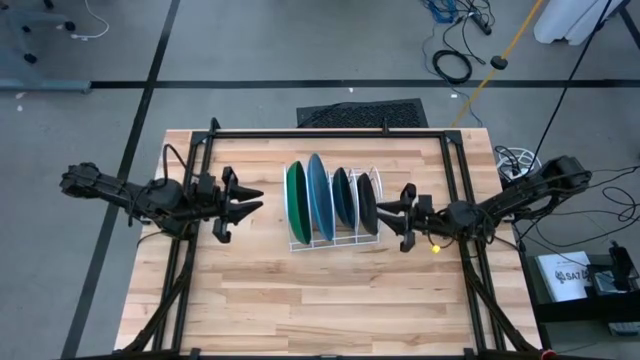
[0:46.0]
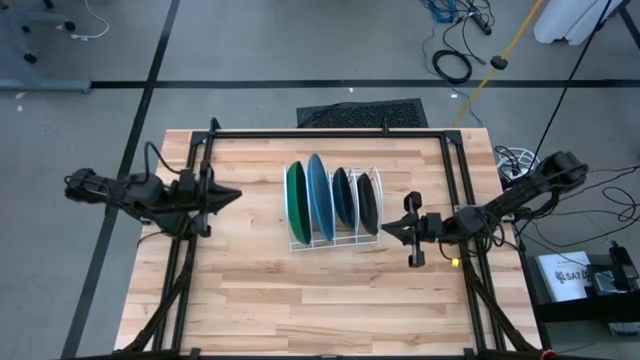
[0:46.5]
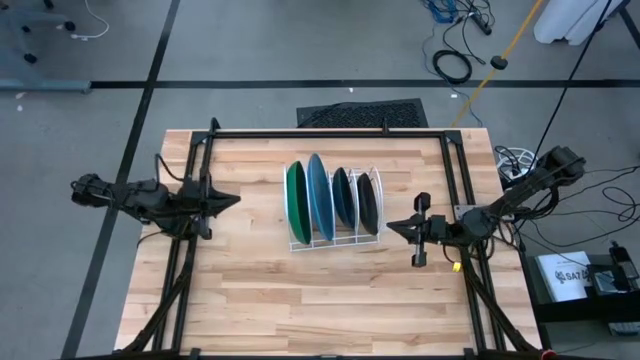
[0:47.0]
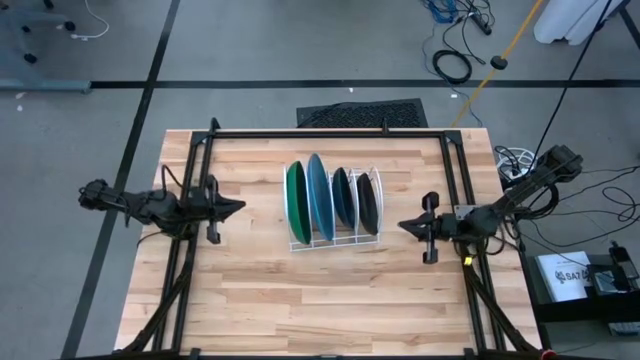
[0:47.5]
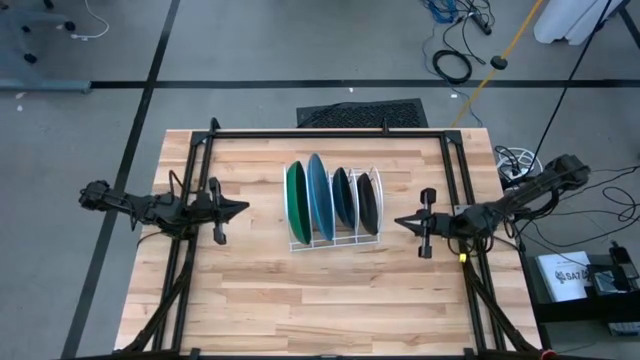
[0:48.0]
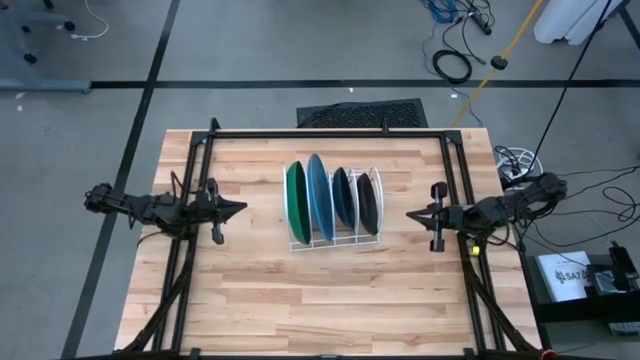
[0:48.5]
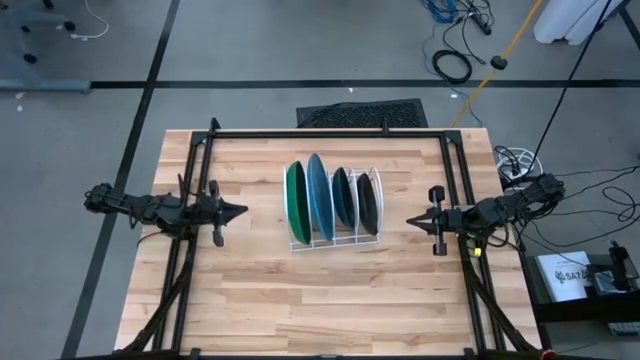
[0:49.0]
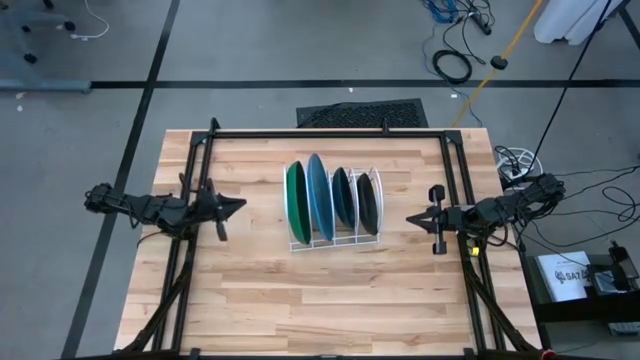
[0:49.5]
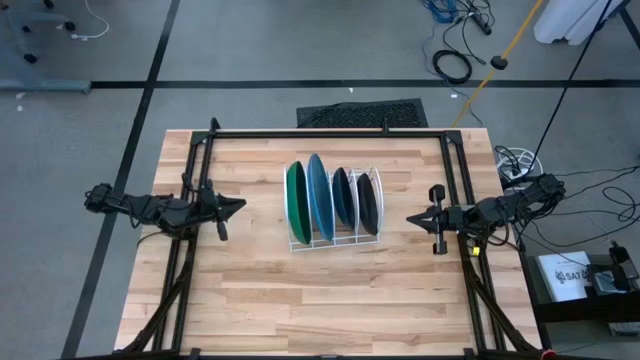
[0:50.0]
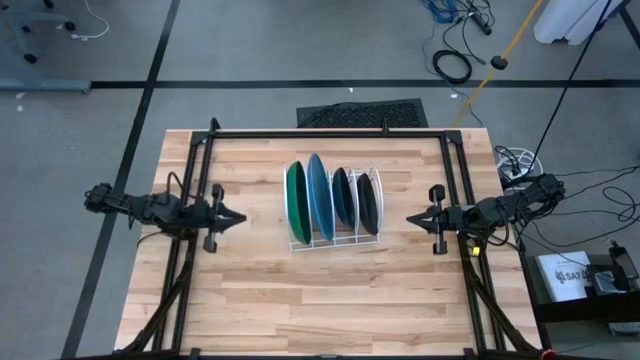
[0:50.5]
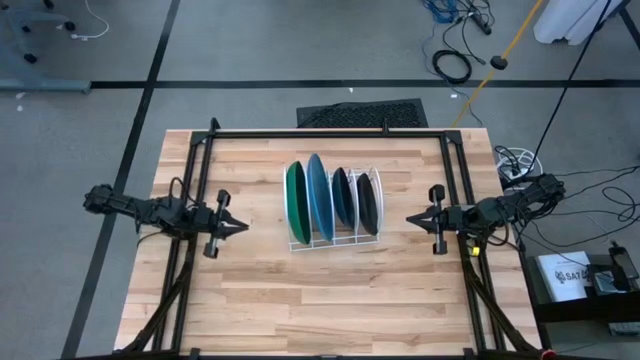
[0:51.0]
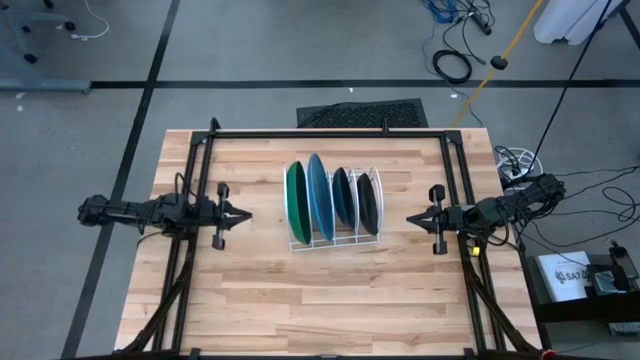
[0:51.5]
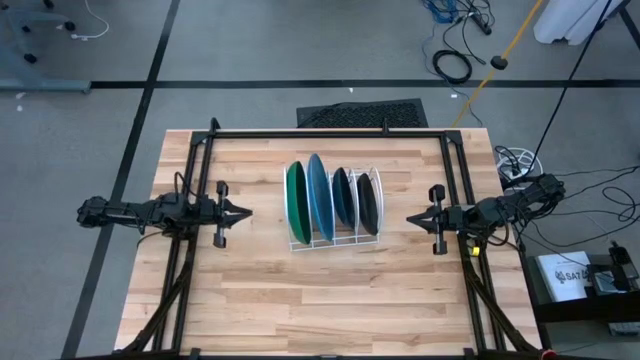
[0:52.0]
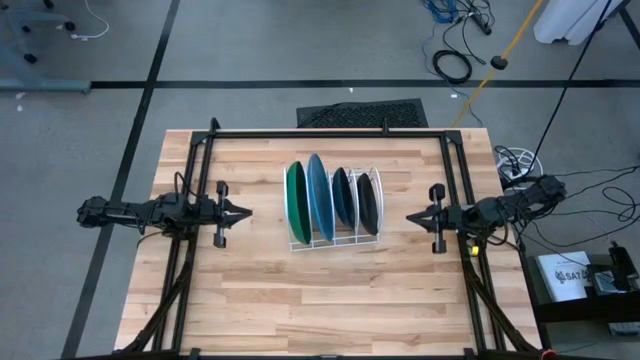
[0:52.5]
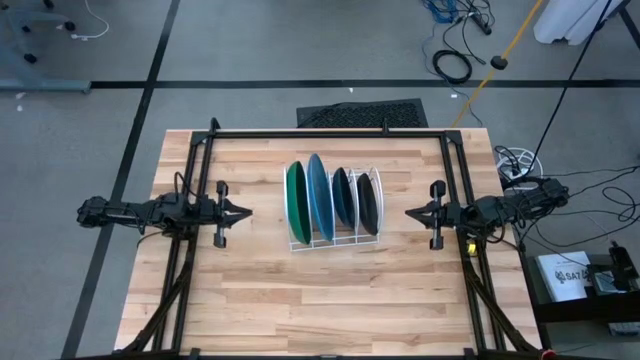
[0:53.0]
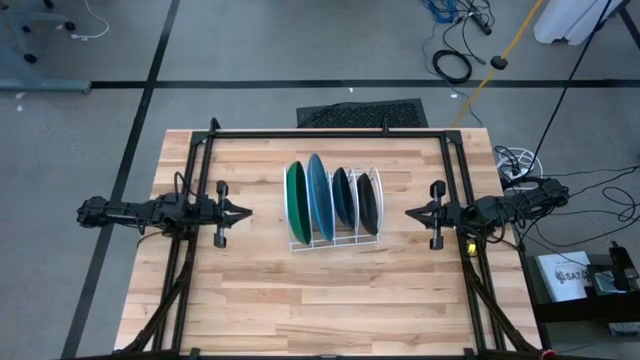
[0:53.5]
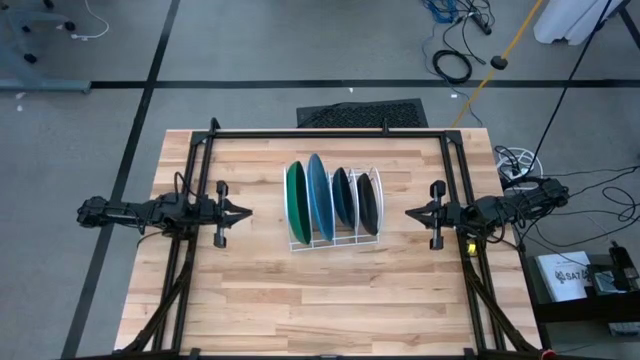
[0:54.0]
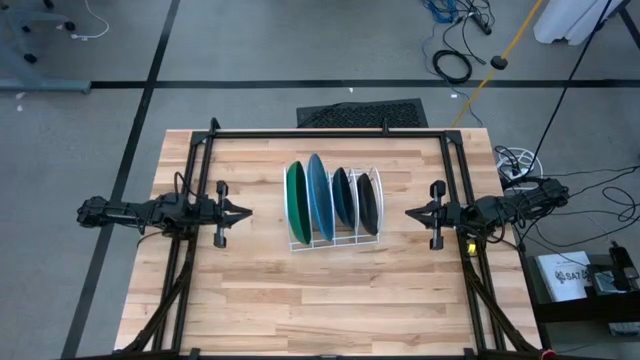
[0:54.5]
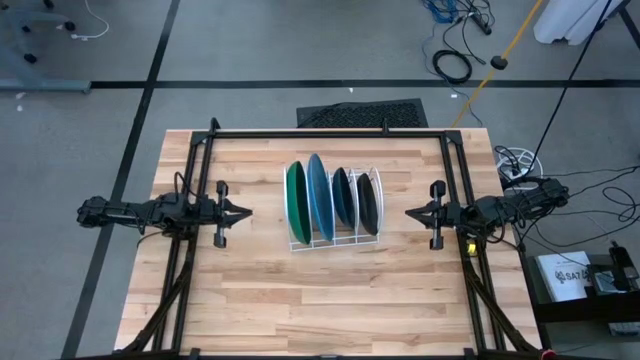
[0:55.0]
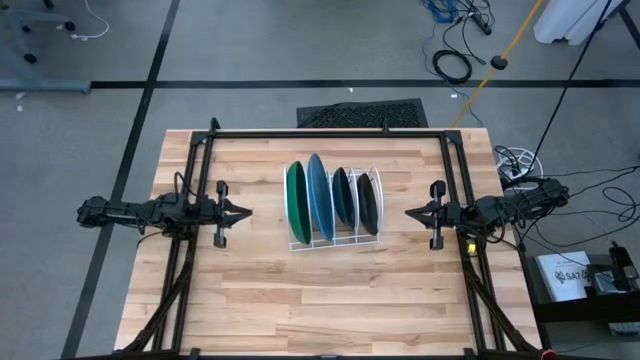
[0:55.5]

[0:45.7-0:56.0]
Task: Sort dishes
Return to Home Position

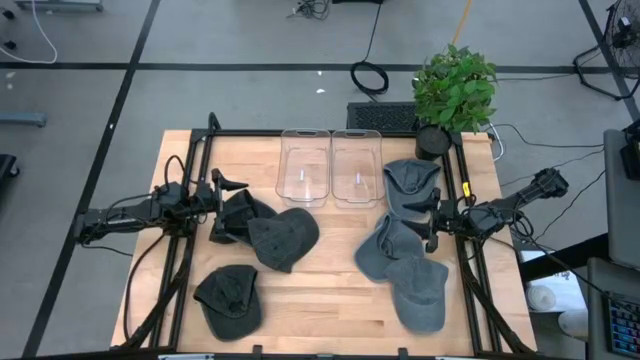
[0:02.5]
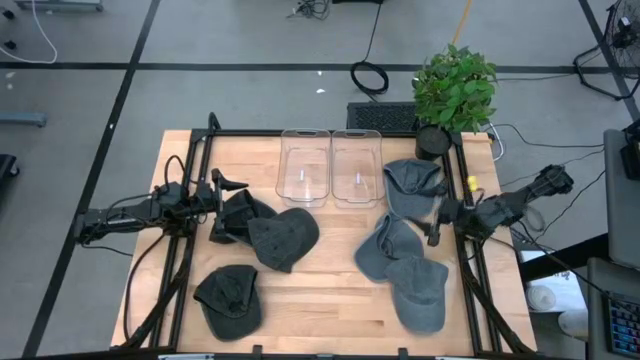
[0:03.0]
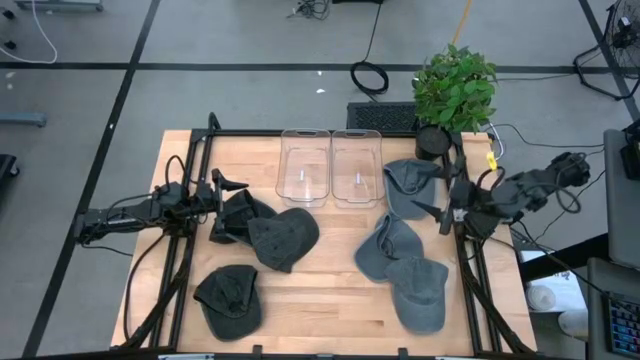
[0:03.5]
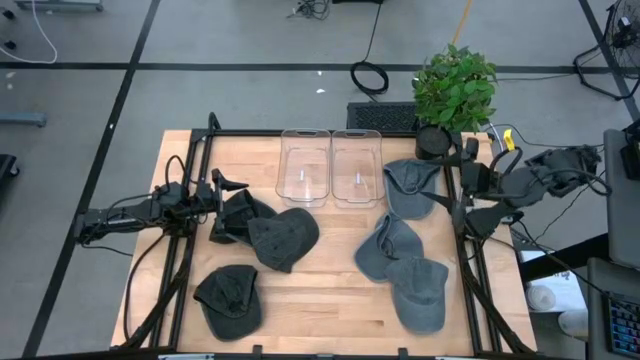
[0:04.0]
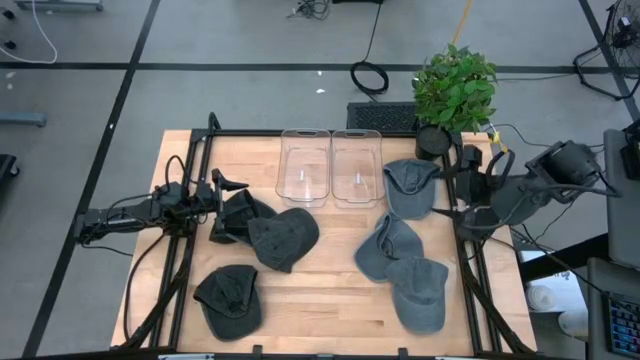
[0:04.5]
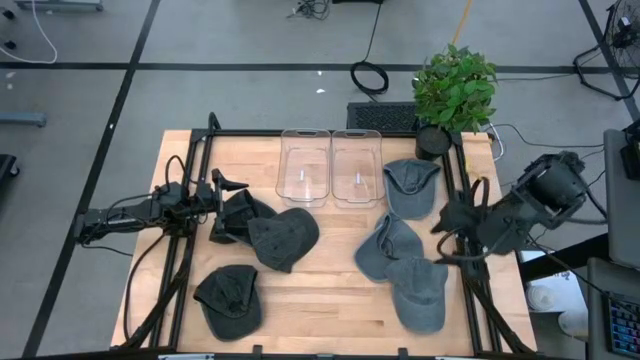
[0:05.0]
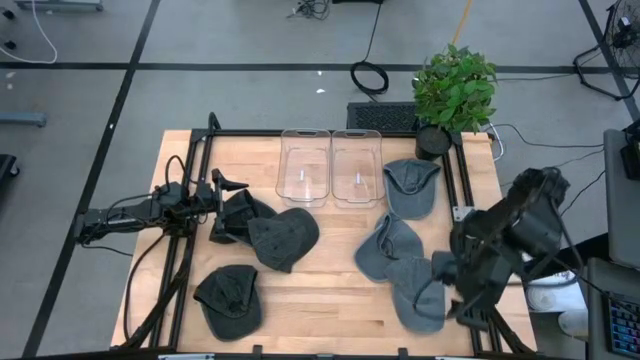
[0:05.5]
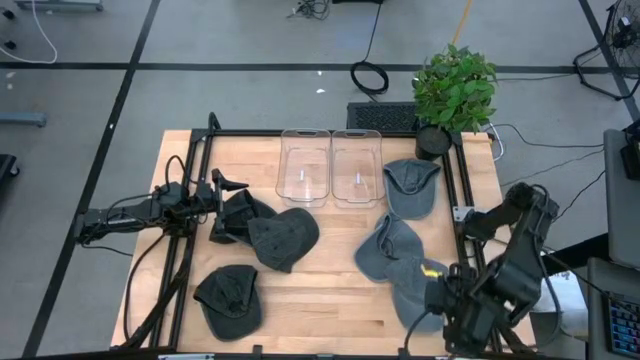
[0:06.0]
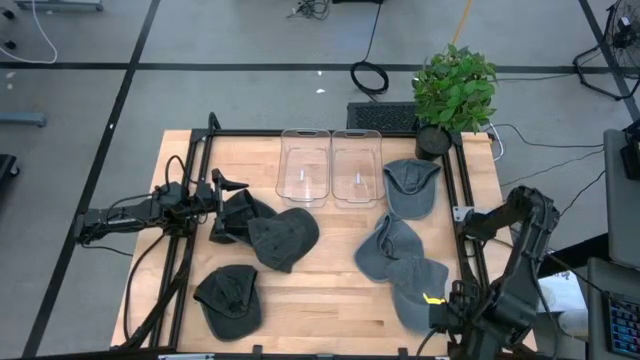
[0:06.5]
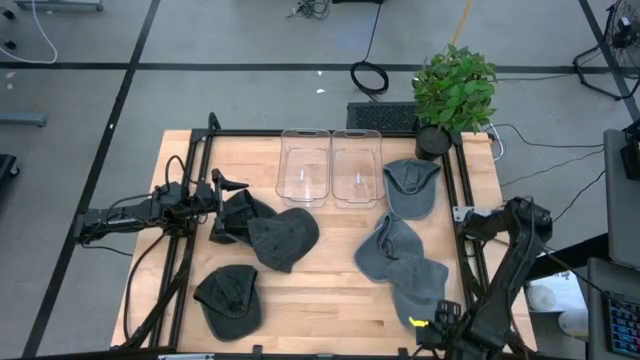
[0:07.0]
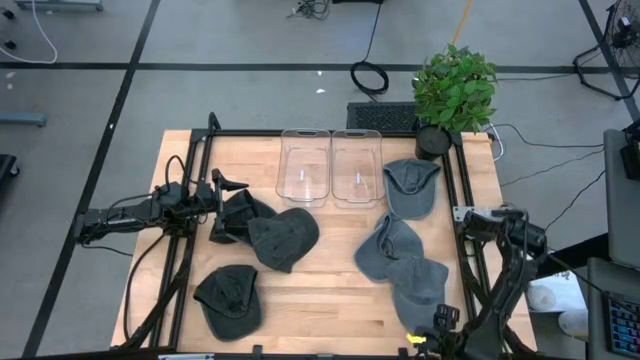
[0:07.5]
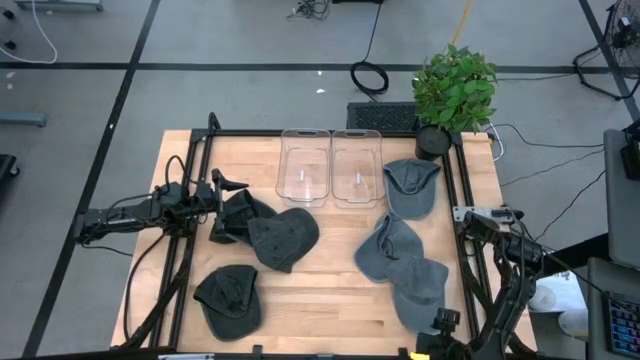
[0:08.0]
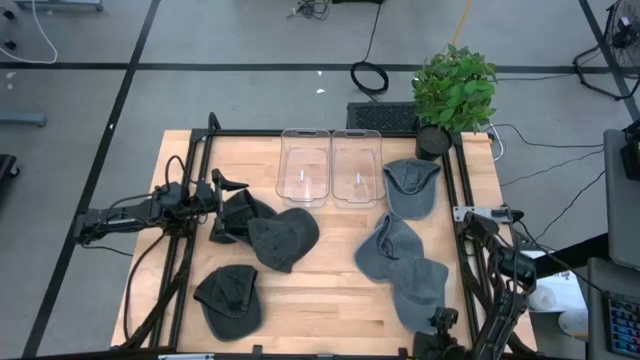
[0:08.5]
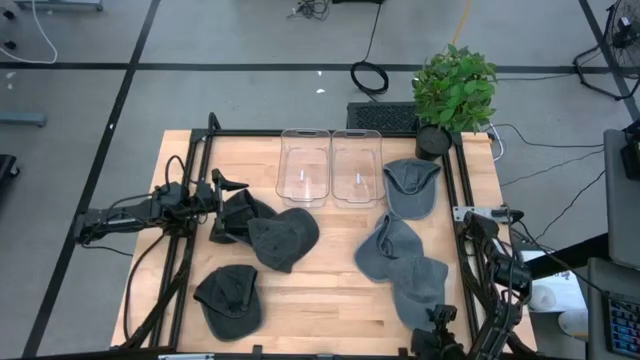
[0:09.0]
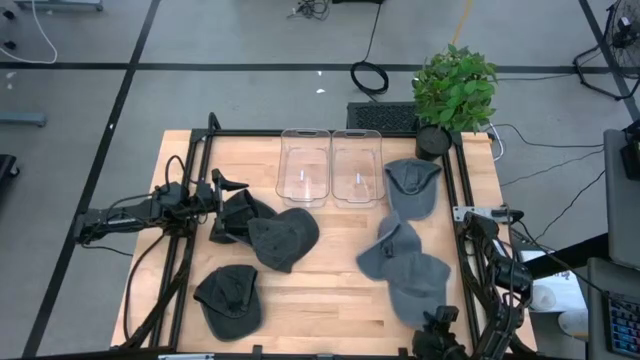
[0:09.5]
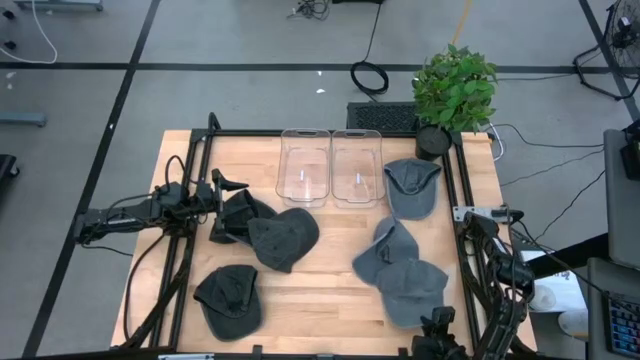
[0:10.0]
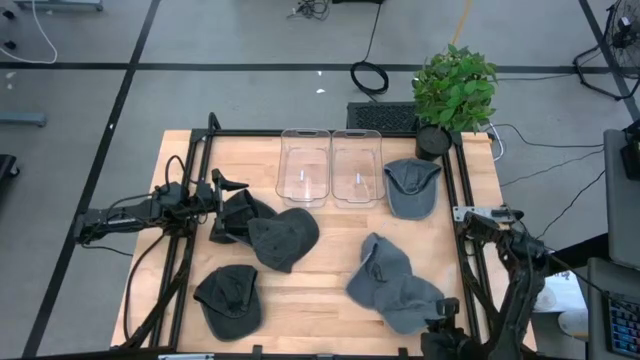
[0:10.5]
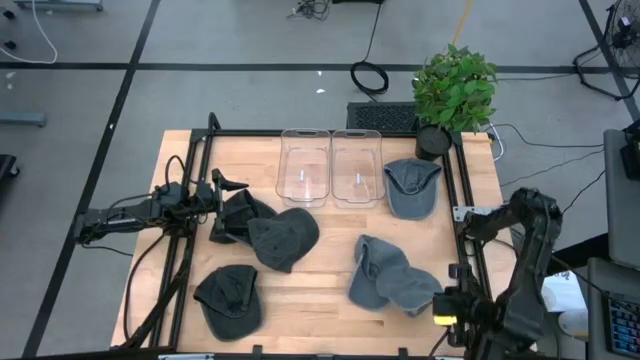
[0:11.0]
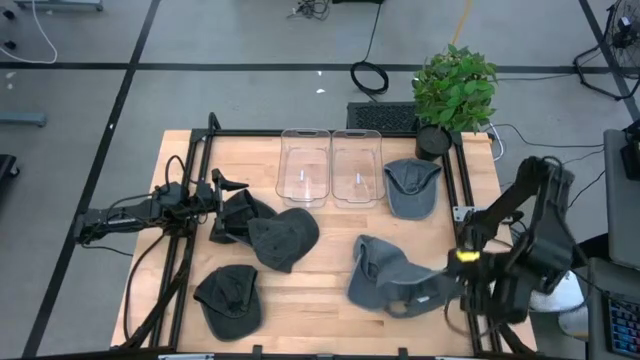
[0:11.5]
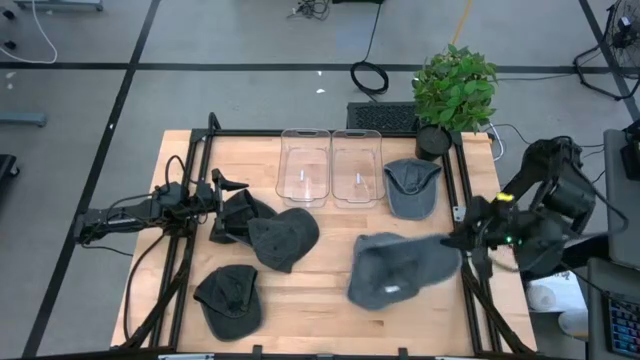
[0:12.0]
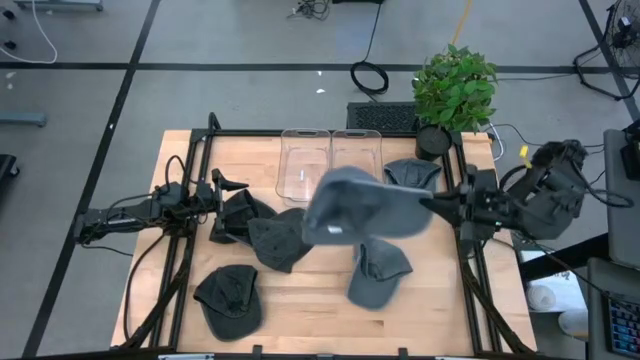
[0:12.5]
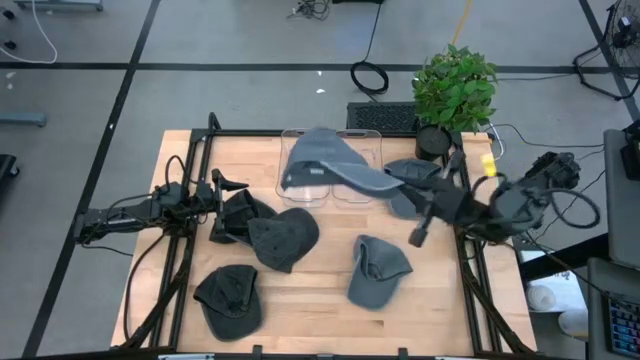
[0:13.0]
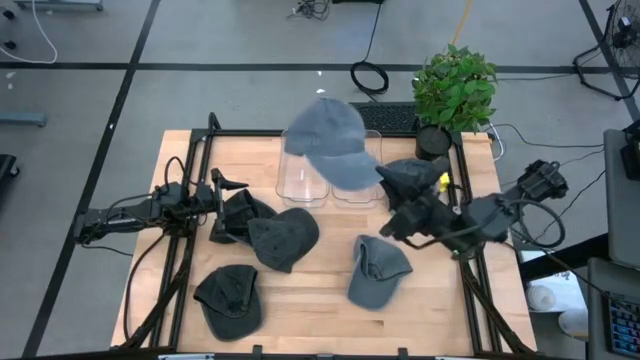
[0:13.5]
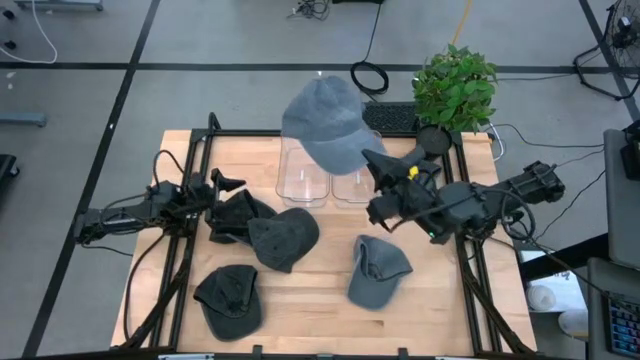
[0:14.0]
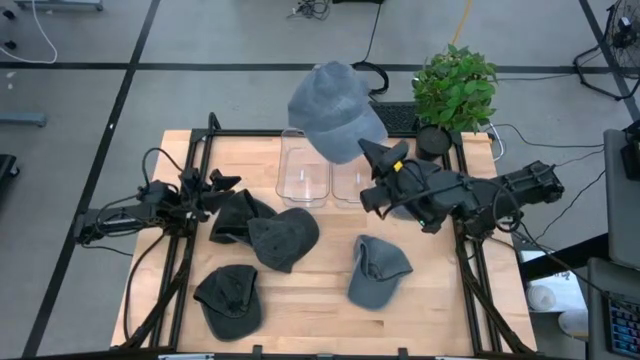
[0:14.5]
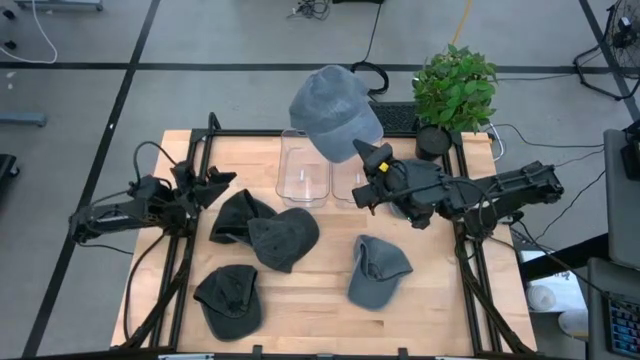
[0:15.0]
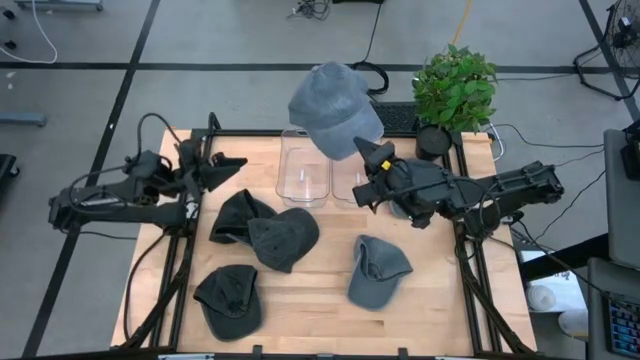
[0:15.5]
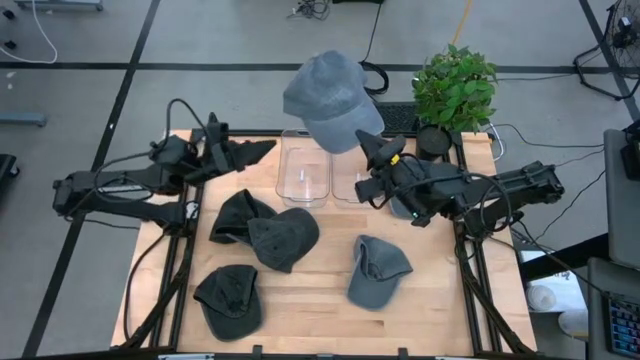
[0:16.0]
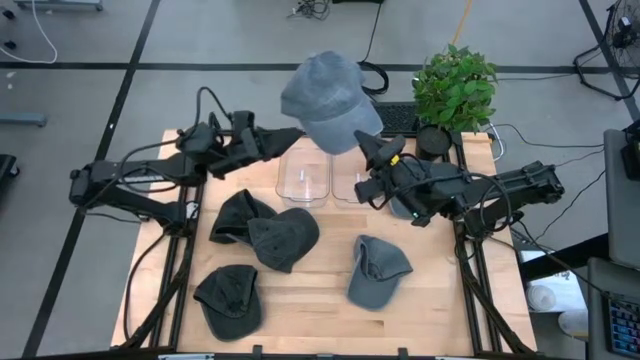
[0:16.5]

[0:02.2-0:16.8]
Task: Pick & Place hat
Put the bottom gray cap into the left transparent bin
